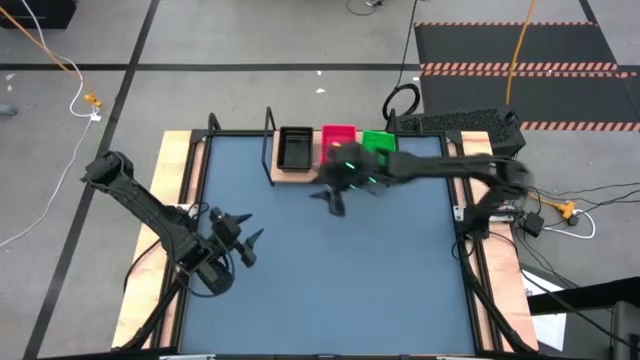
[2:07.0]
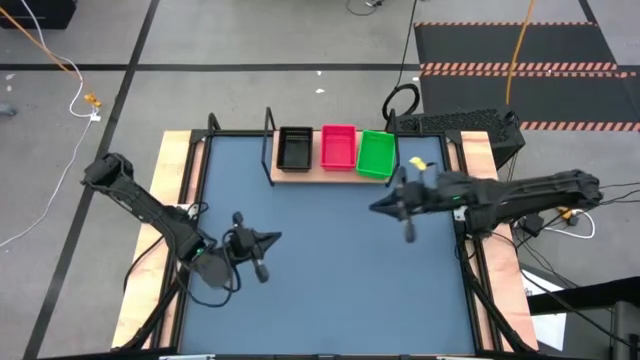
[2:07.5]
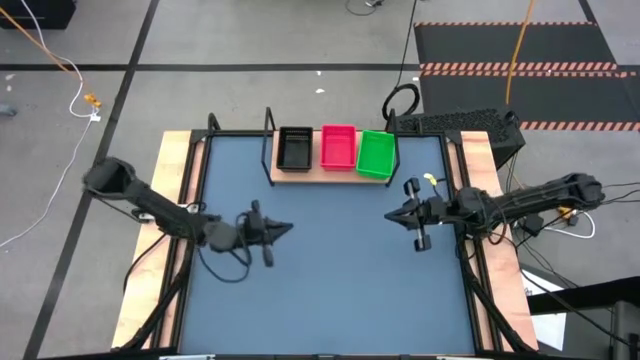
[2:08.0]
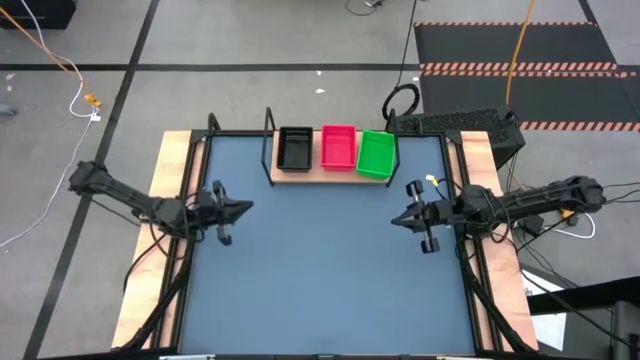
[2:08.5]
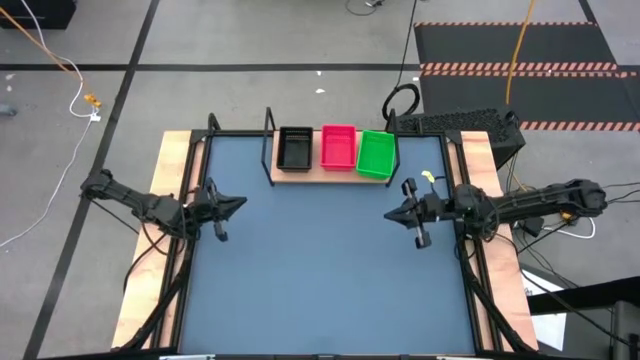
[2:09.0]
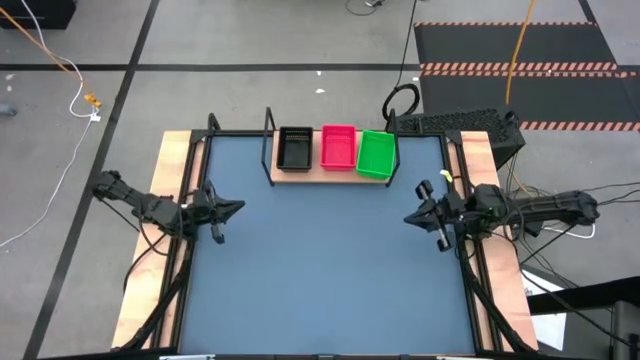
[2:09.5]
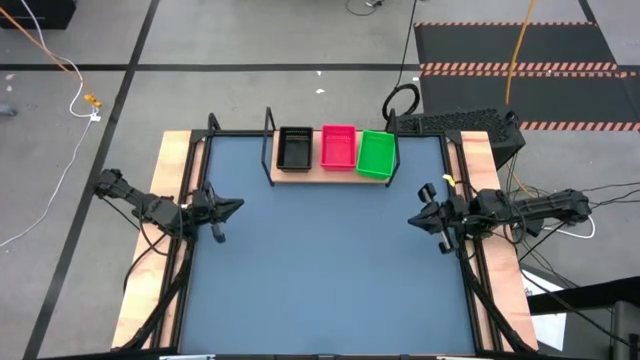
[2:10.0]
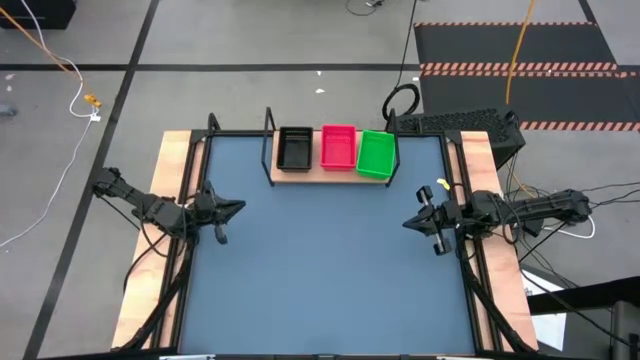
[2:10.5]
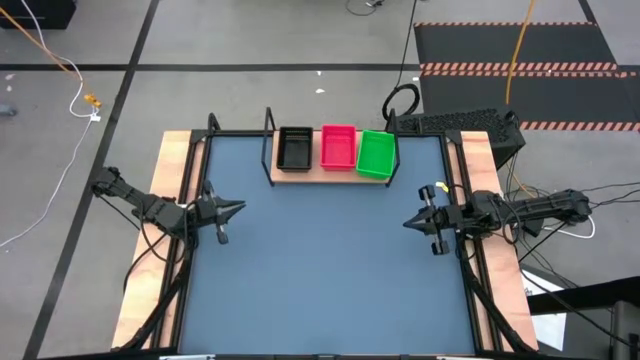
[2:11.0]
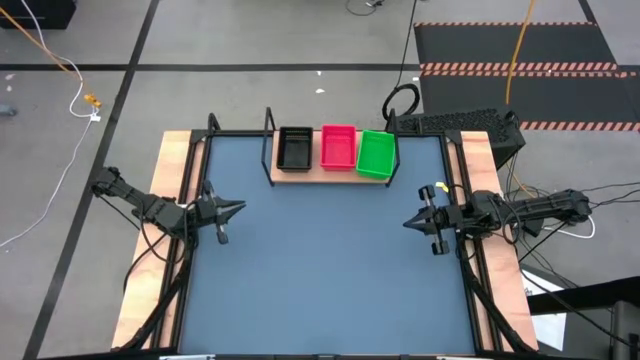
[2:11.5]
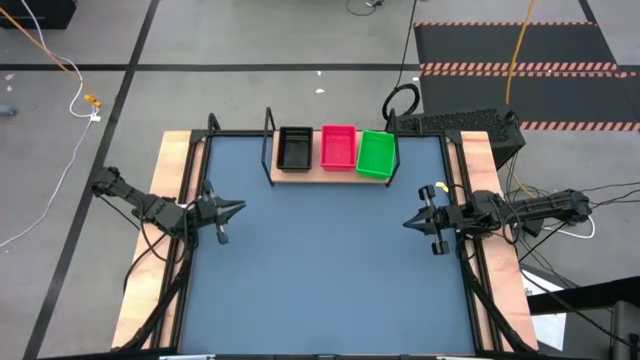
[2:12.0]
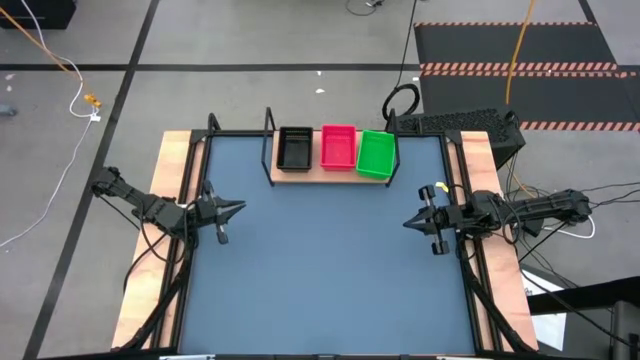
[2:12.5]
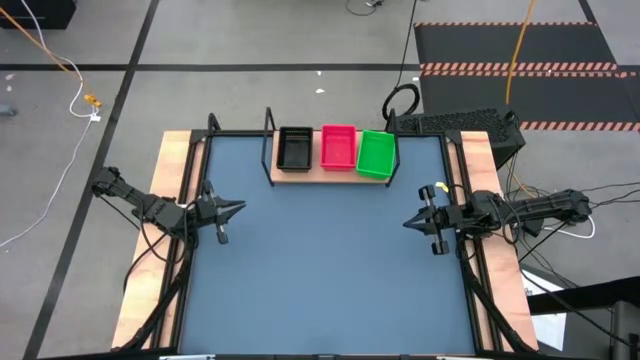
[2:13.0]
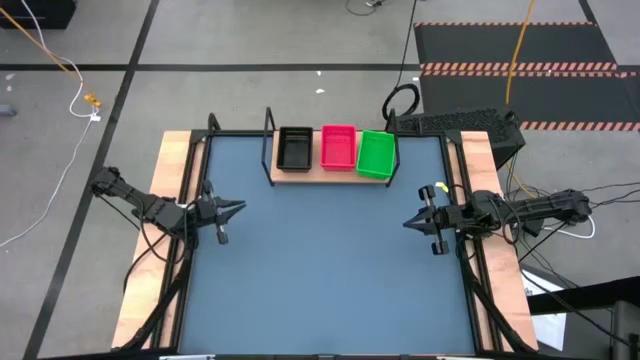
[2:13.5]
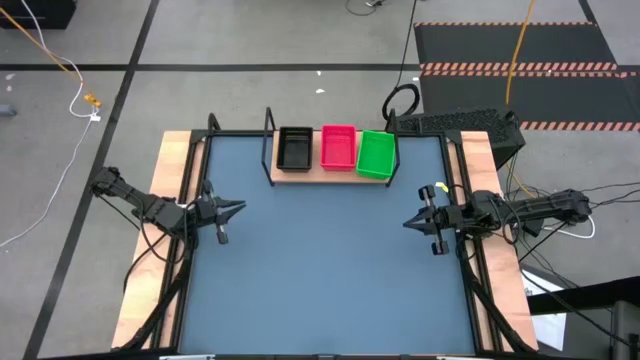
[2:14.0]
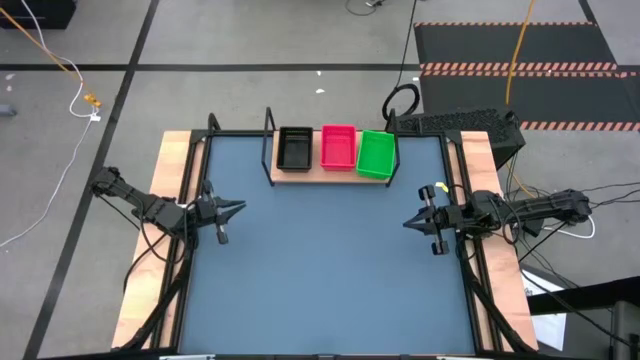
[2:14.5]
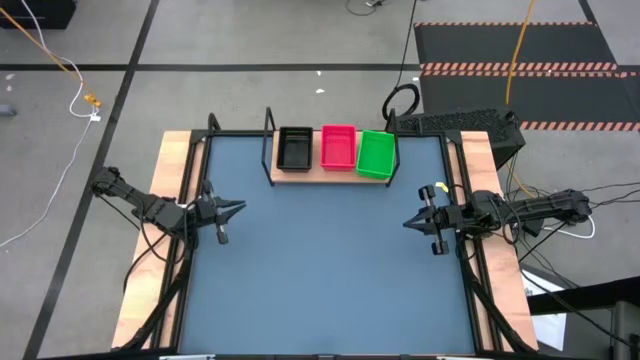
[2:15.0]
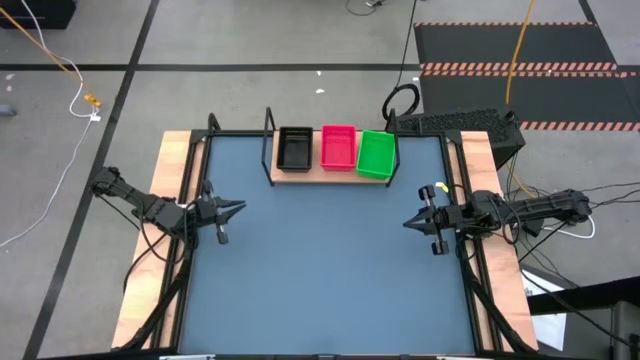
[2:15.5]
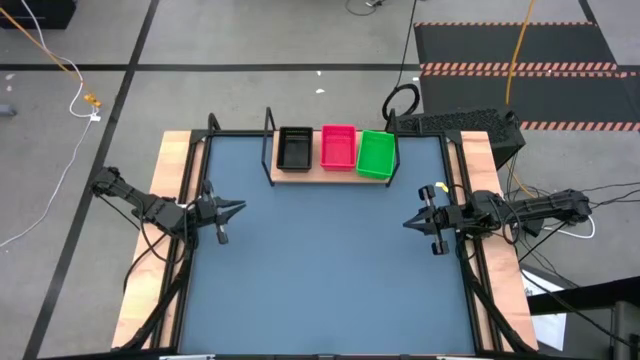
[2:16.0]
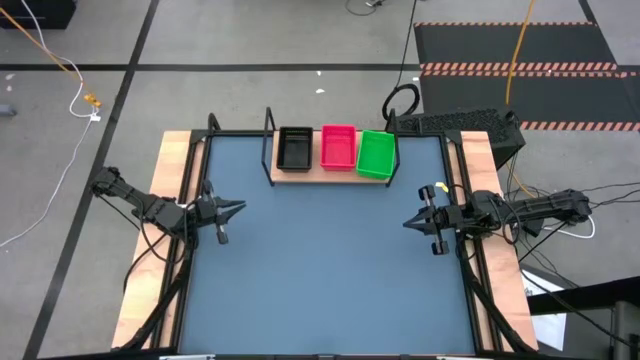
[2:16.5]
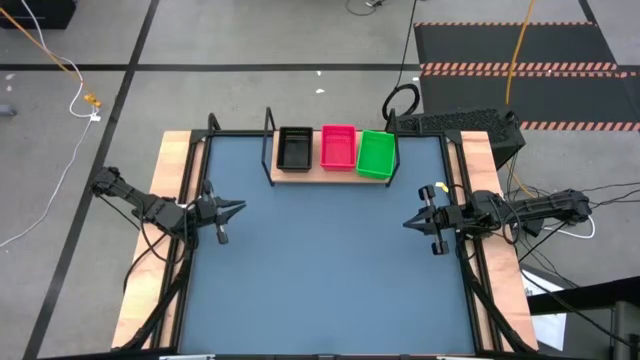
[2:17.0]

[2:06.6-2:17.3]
Task: Stack baskets on shelf by color
Return to Home Position

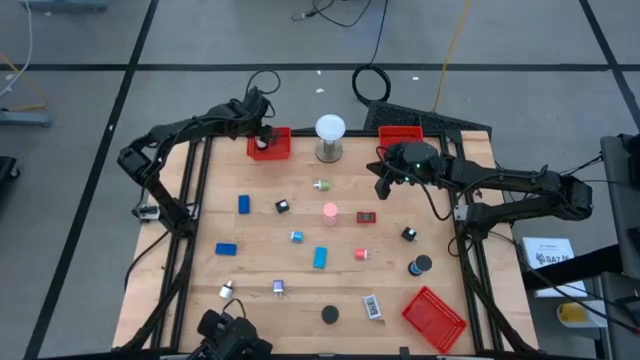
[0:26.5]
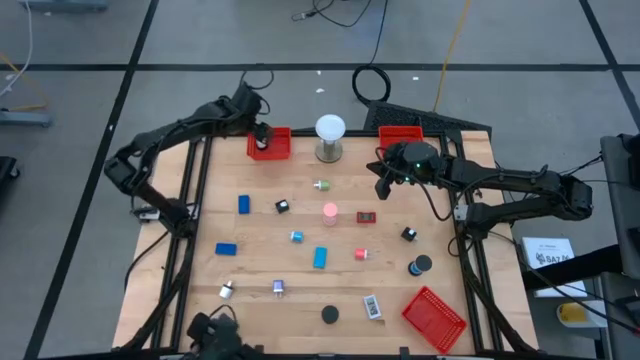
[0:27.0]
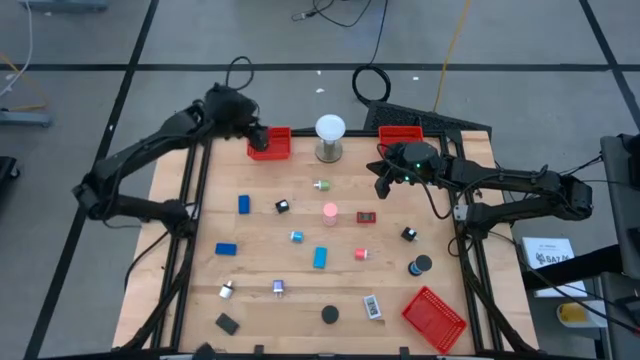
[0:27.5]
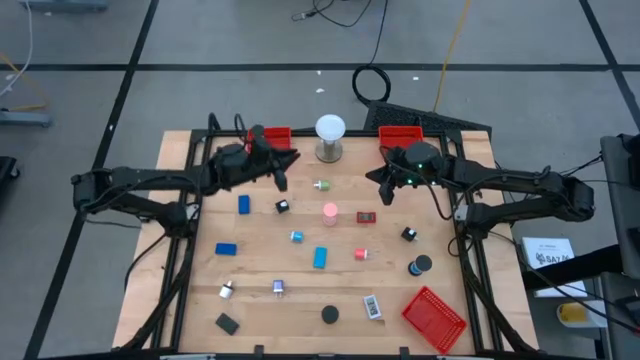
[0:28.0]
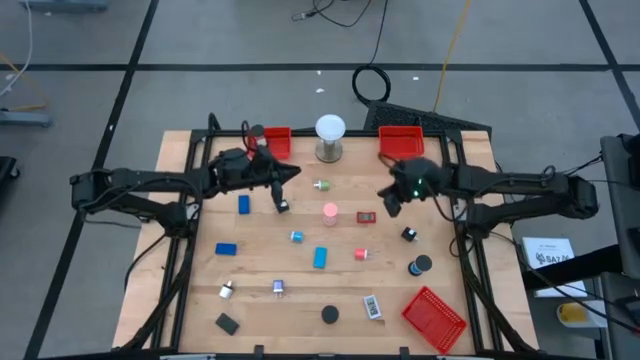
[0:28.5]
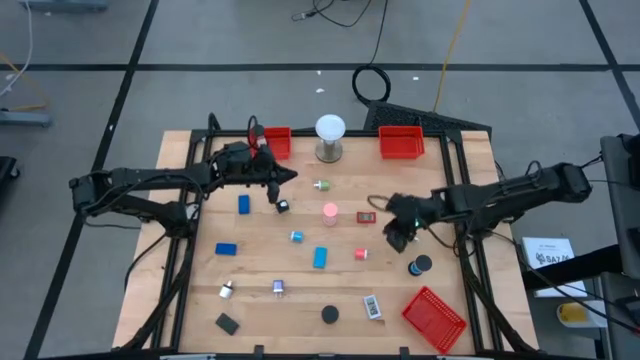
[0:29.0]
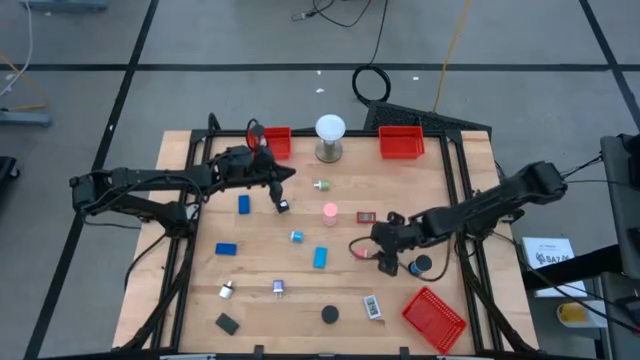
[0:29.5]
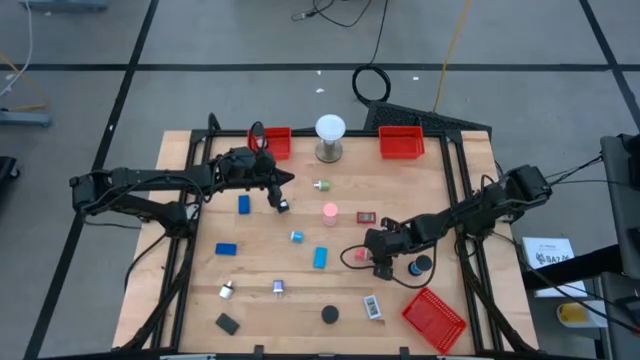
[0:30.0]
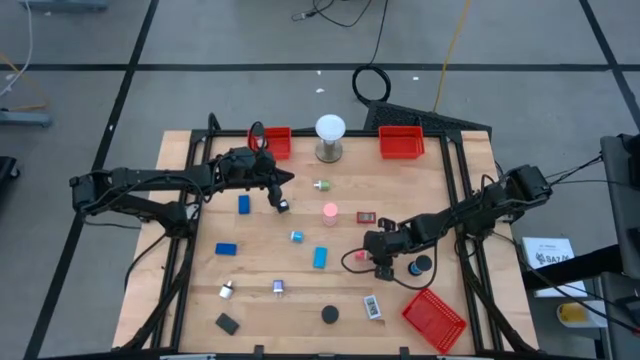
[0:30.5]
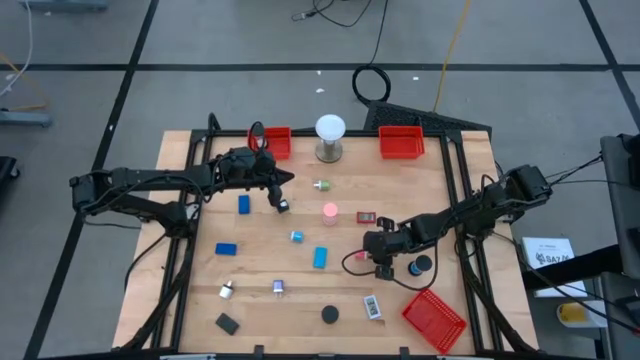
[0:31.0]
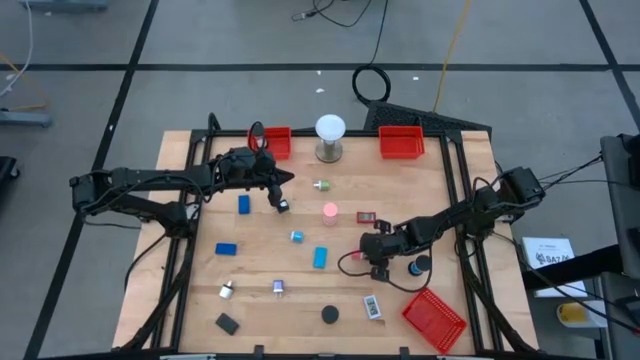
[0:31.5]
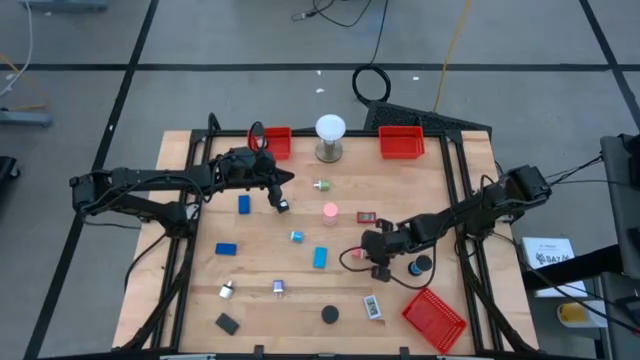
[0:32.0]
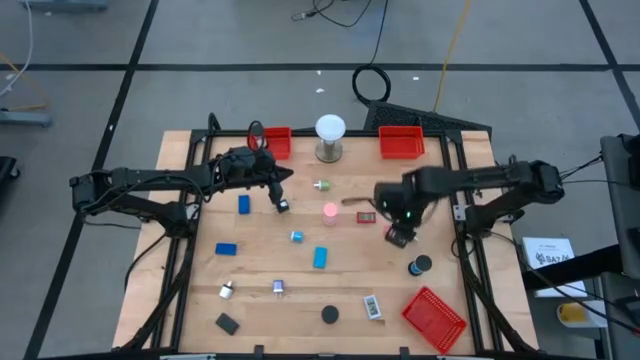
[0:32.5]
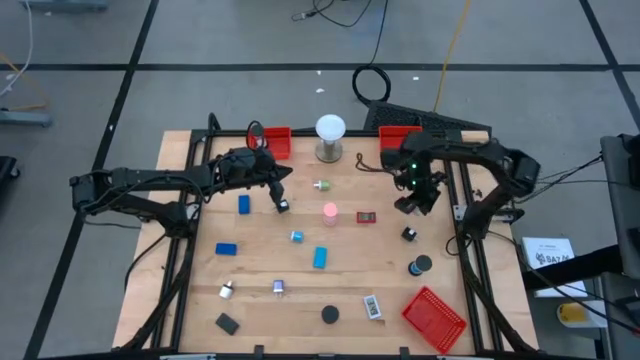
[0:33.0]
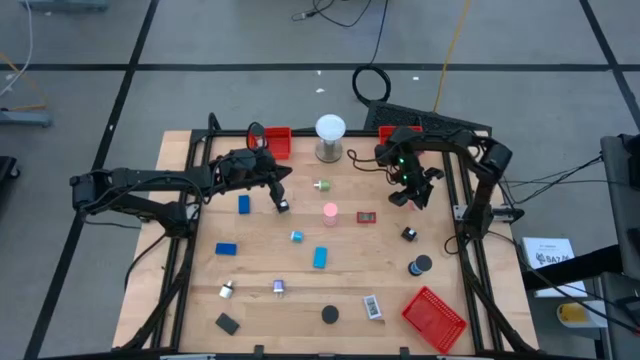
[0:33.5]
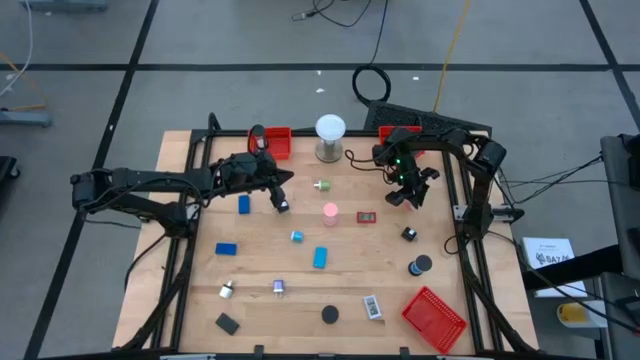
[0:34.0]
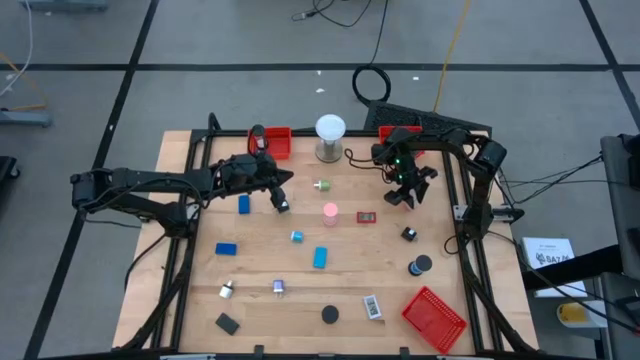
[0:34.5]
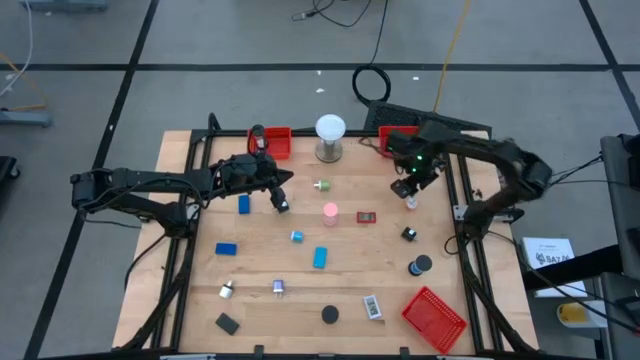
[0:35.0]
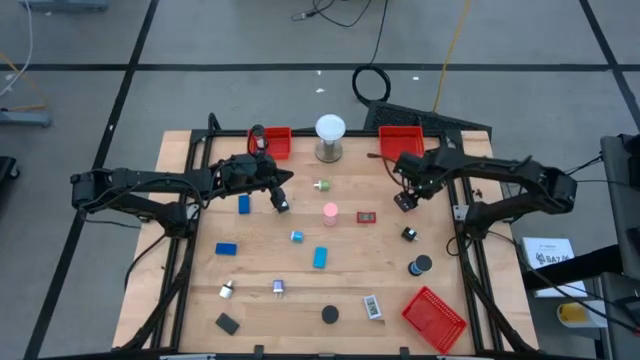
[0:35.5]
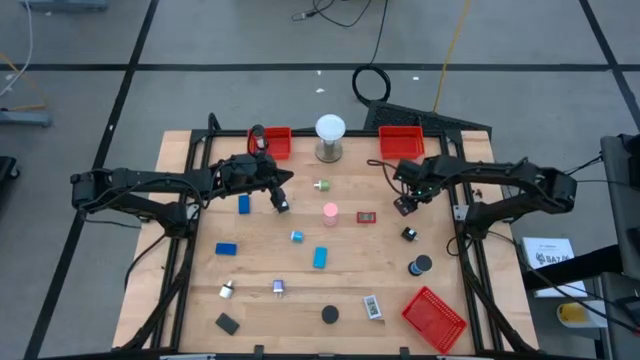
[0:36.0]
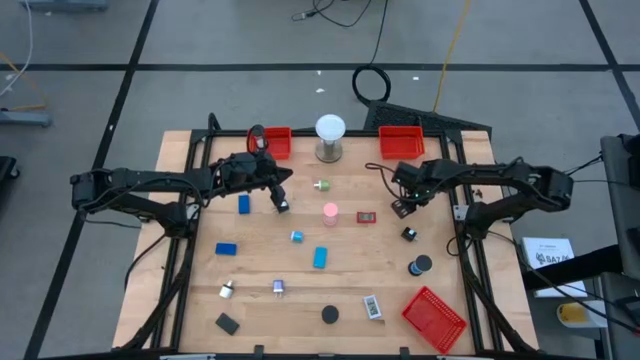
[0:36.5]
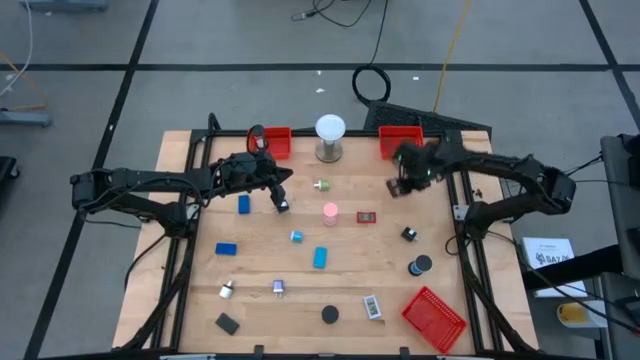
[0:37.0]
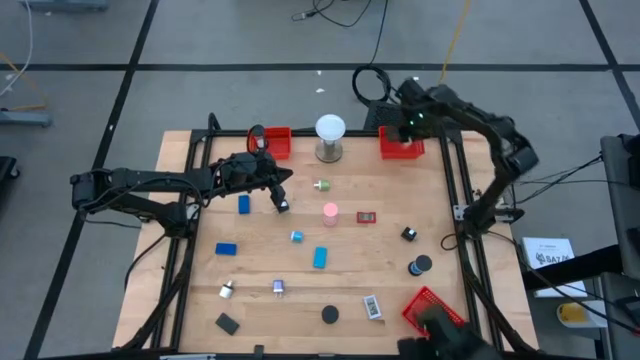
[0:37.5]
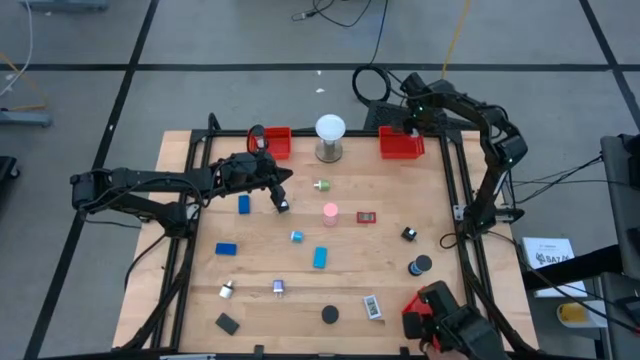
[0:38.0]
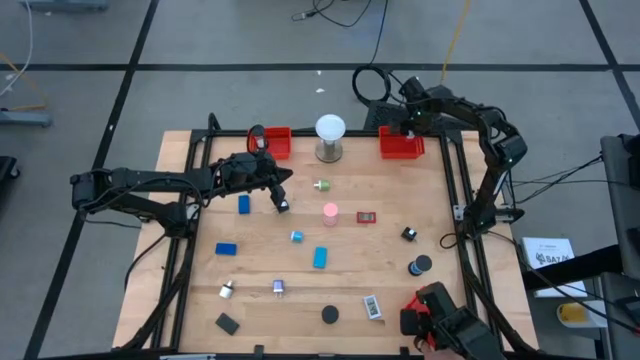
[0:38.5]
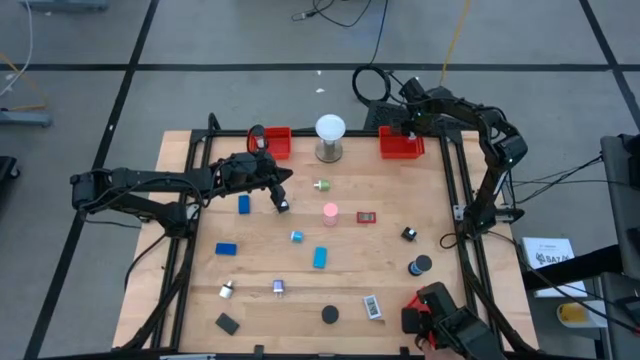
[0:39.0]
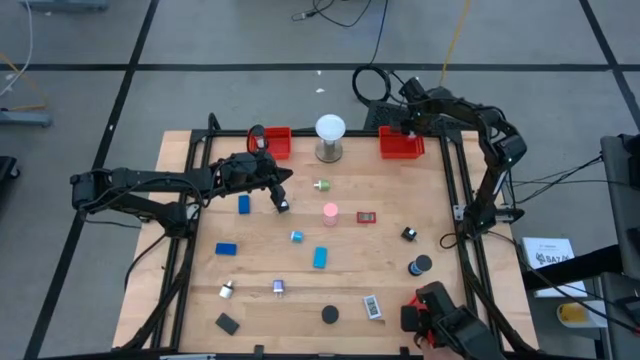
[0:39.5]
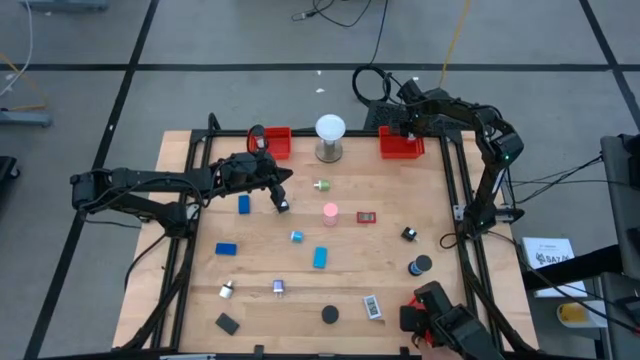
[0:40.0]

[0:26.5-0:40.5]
Task: Pick & Place Office items
Put the pink charger adapter into the top right red bin
